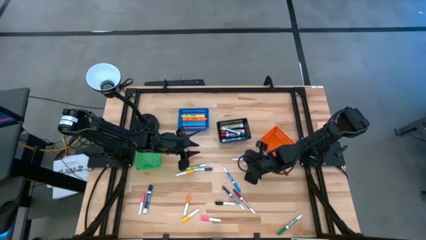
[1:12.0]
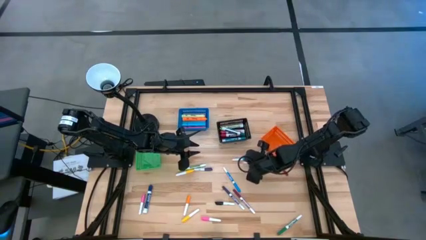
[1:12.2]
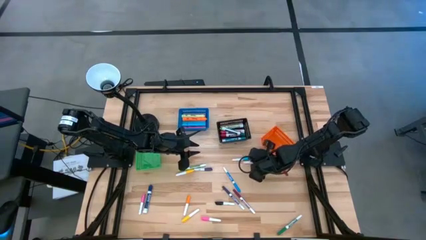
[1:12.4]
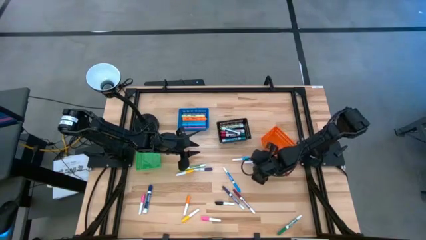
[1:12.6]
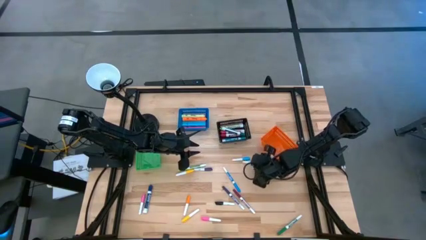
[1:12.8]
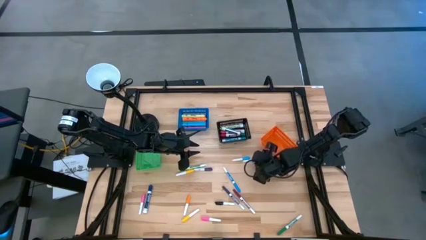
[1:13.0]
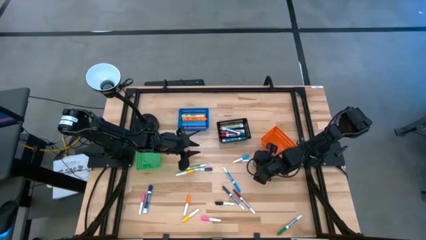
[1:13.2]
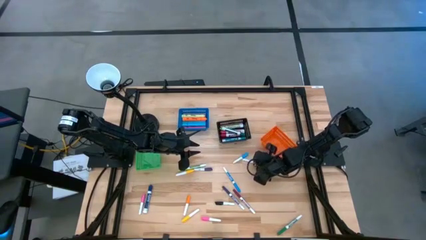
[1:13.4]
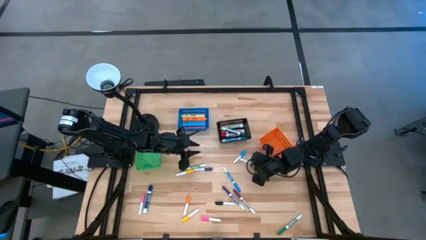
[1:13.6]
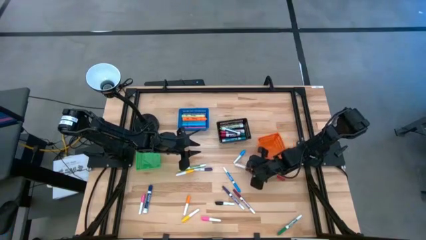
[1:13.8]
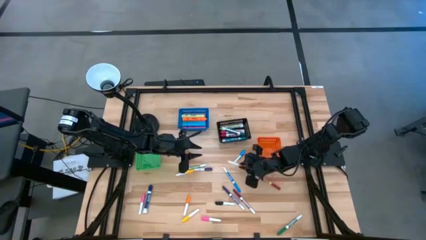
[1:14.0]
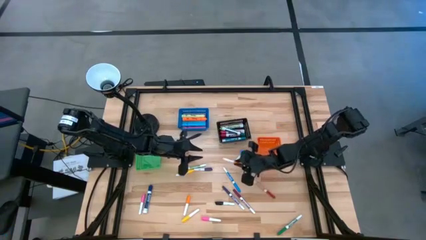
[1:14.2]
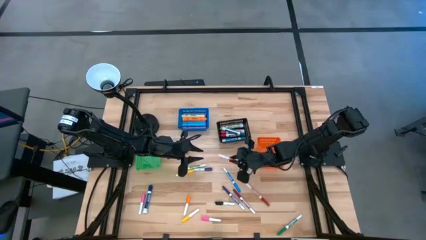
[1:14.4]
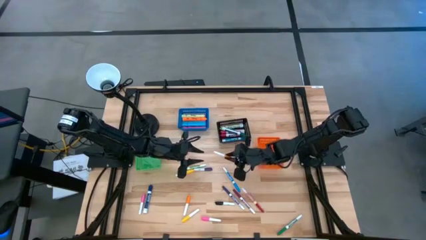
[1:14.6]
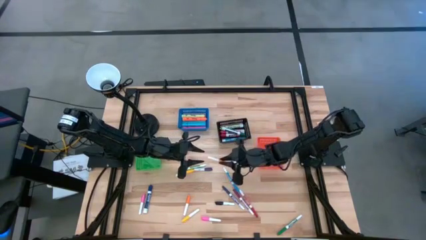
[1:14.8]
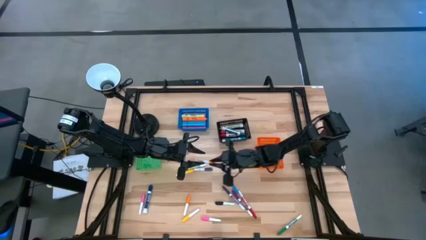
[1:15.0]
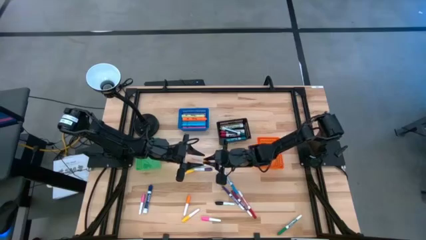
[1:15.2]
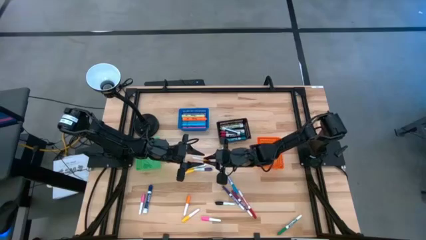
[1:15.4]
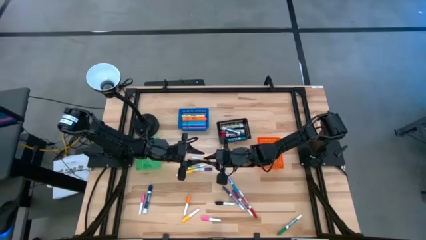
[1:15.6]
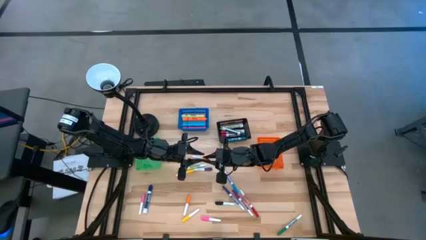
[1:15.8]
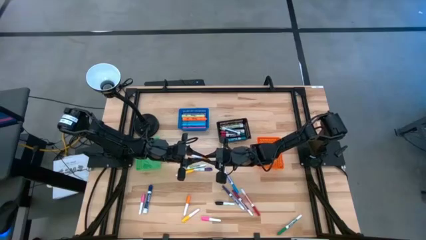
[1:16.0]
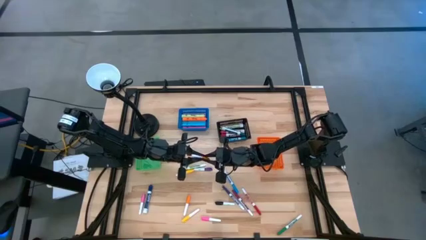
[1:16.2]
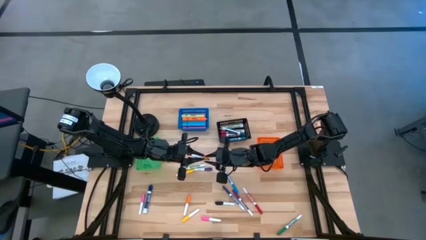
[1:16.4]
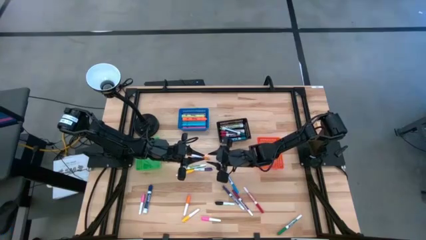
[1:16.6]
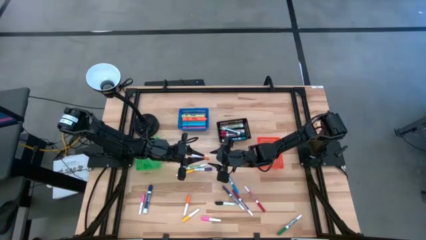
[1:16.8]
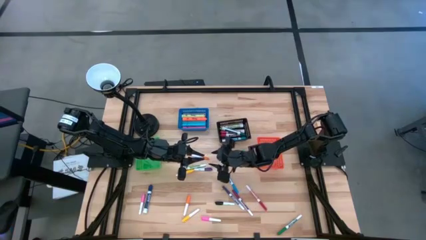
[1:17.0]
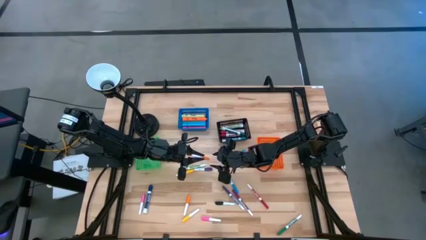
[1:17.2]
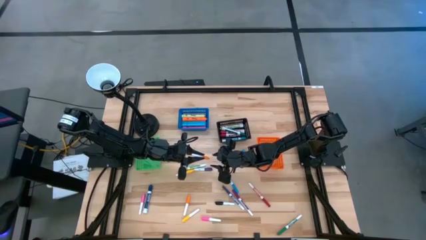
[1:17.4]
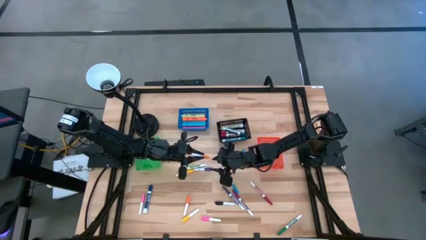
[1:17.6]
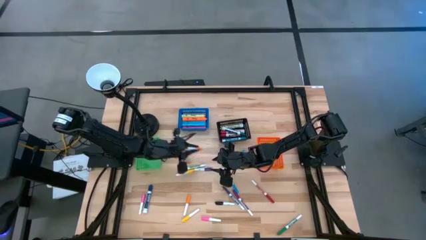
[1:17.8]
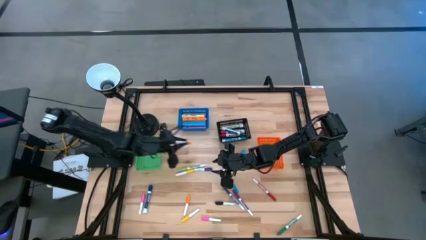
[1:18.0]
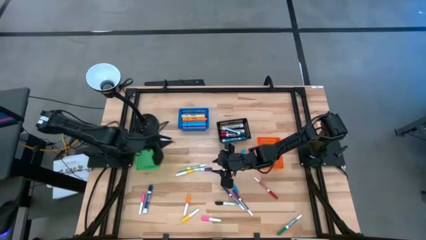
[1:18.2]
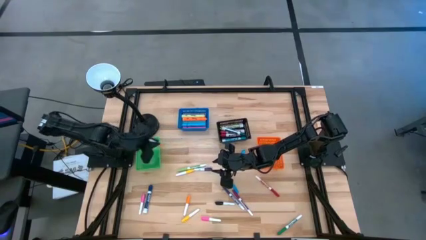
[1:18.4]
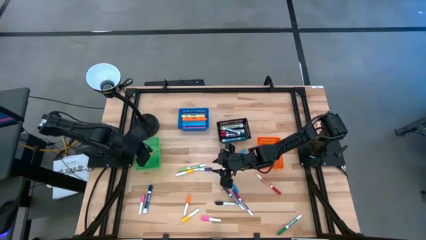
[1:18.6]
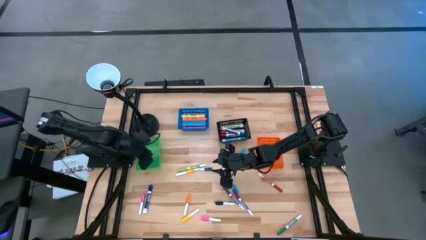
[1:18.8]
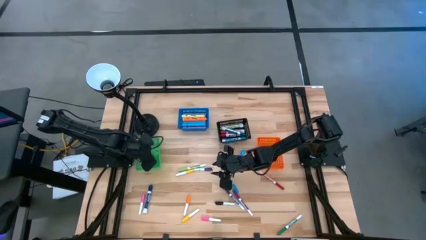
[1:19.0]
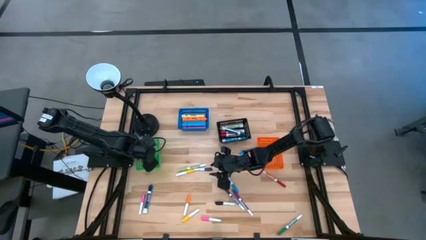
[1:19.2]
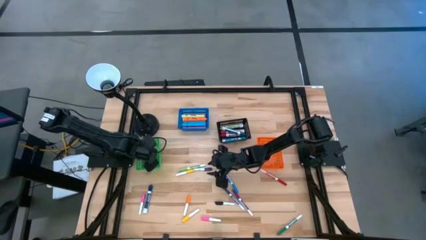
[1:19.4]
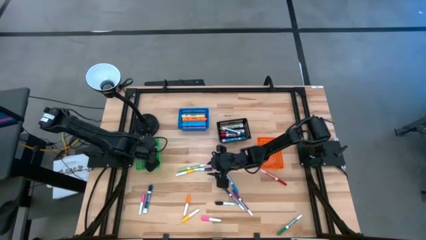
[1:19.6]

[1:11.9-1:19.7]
Task: Pick & Place Markers
Put the right orange highlighter pen into the green basket

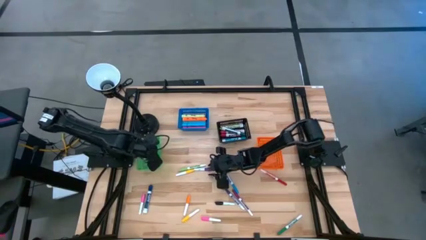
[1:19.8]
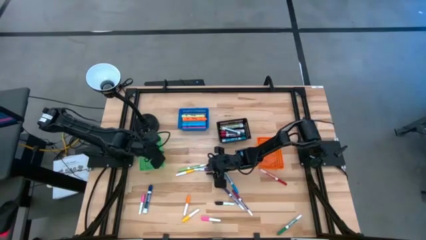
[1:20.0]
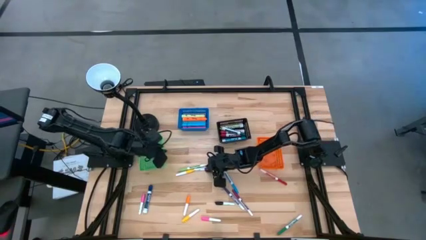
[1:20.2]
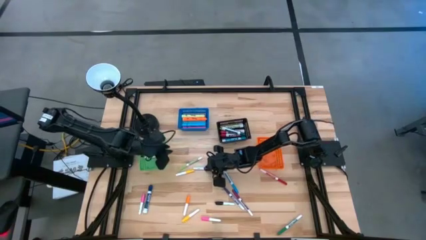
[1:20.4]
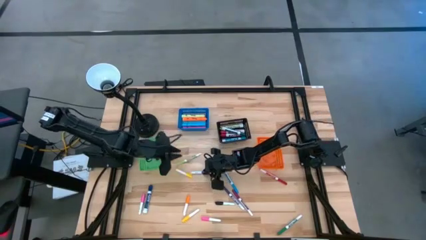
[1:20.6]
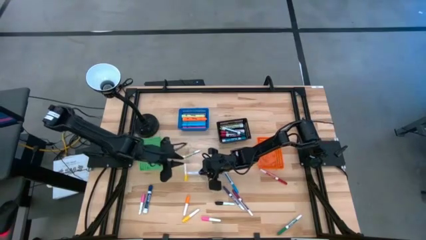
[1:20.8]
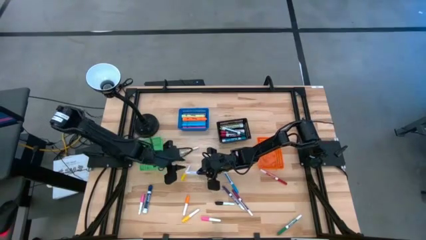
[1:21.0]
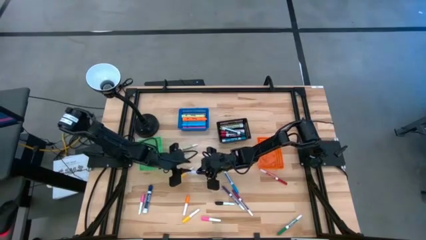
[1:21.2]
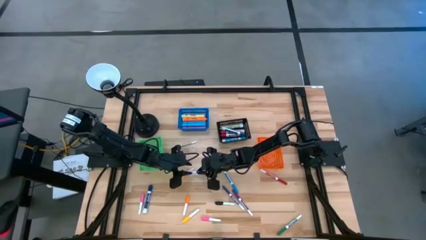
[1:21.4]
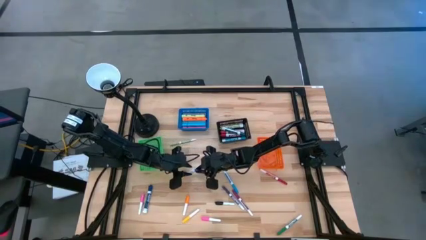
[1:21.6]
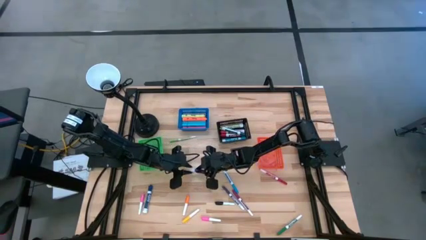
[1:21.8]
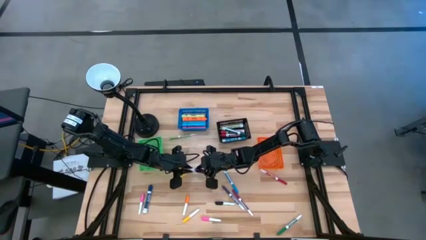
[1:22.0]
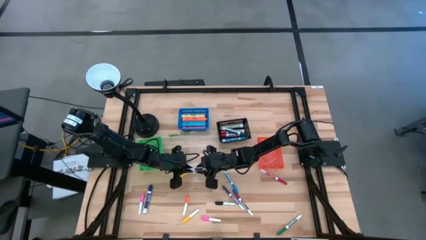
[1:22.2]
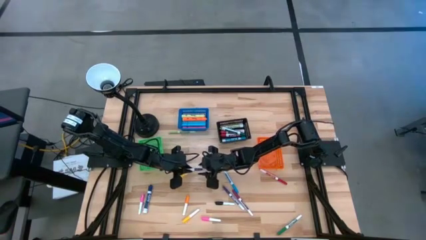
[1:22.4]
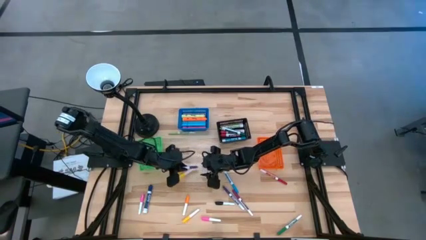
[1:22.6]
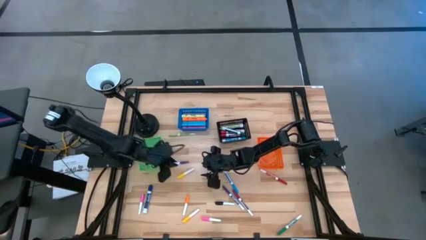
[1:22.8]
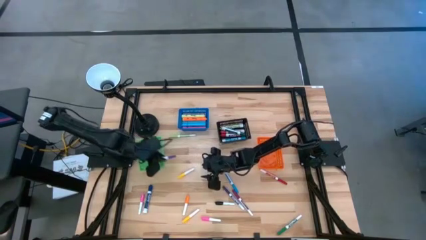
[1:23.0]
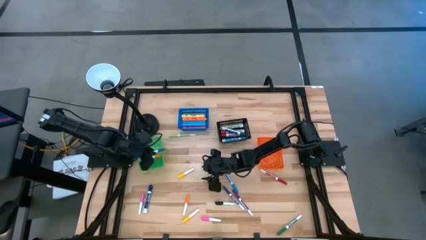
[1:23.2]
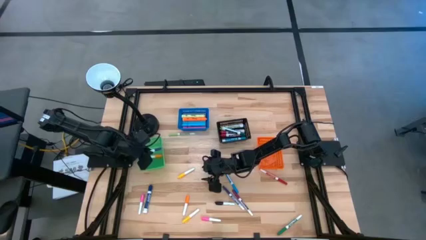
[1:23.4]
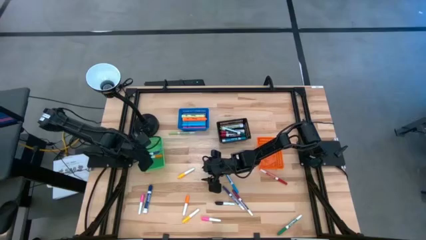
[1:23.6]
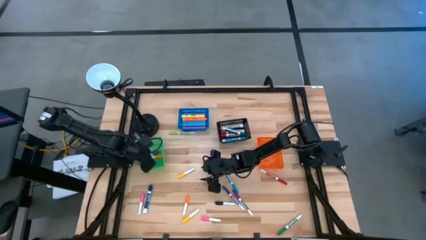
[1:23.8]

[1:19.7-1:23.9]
Put the violet highlighter pen into the green basket

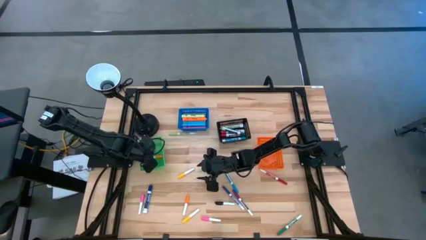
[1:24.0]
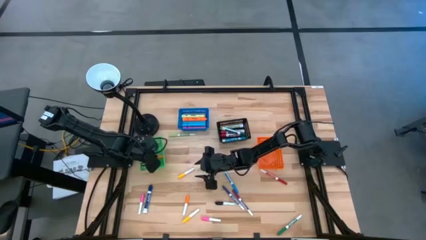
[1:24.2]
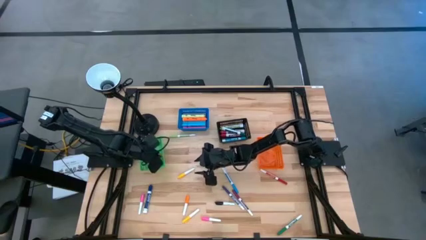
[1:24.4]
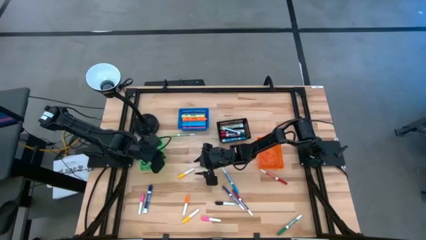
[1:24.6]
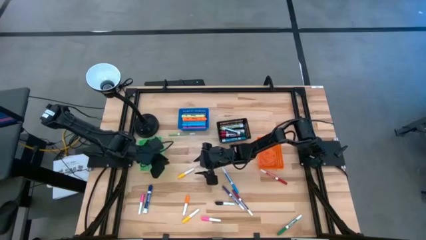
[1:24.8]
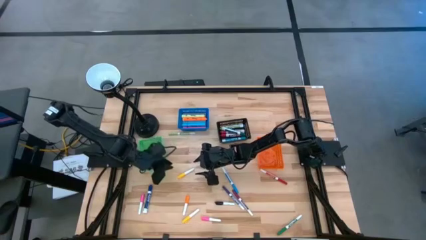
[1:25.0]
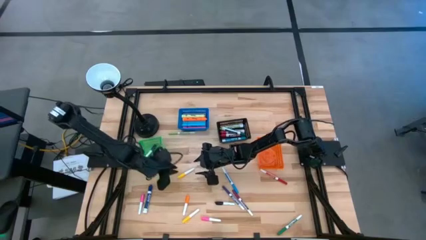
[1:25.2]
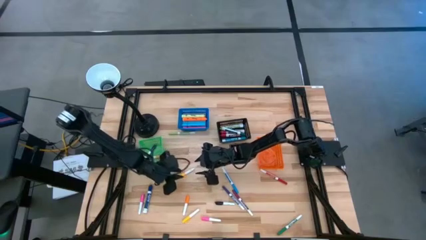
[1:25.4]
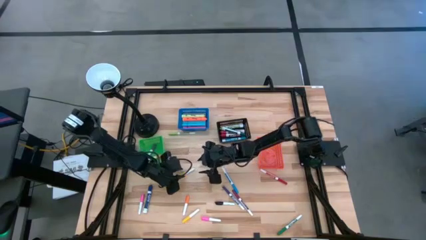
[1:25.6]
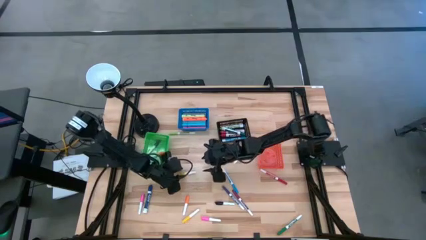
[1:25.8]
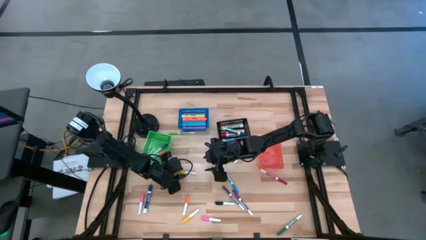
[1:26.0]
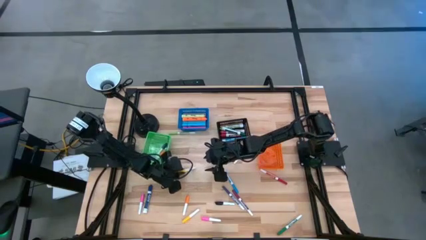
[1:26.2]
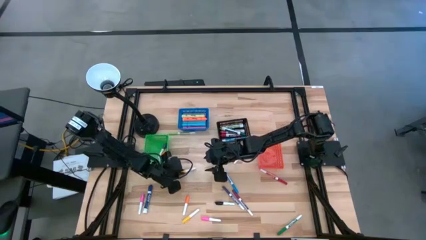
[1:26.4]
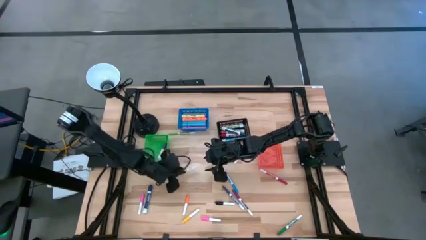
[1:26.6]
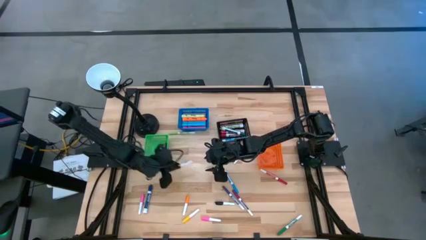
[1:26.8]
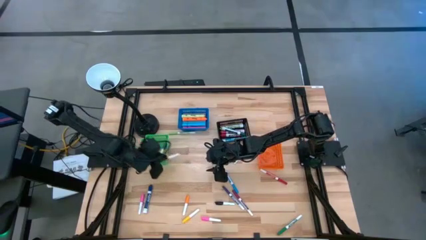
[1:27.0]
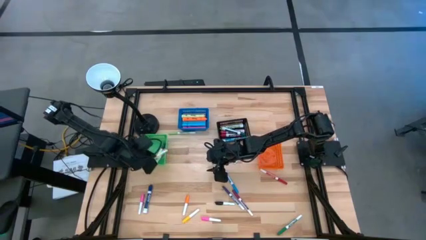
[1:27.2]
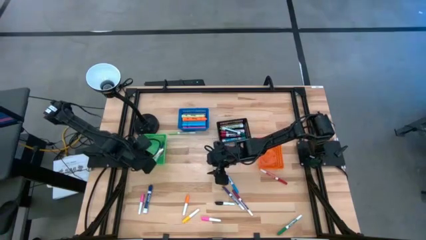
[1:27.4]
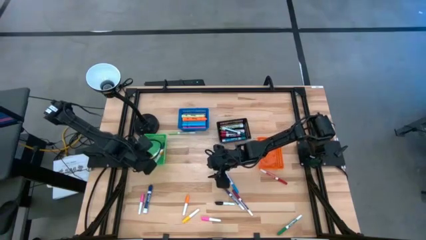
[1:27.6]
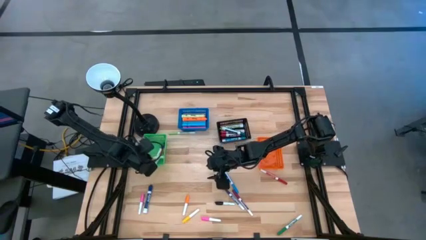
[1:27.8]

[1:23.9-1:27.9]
Put the top yellow highlighter pen into the green basket
